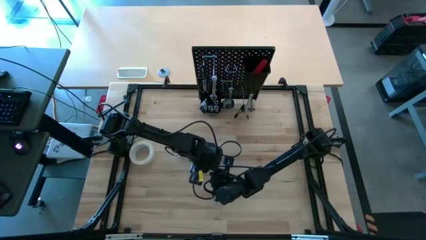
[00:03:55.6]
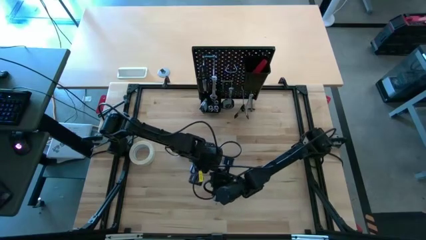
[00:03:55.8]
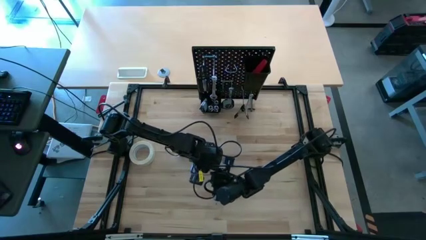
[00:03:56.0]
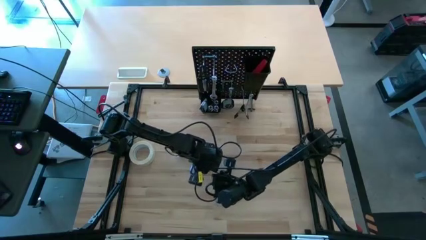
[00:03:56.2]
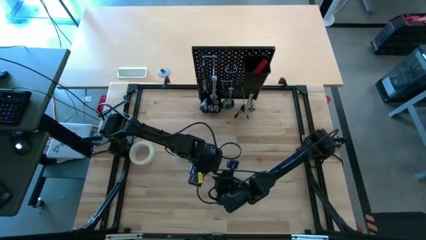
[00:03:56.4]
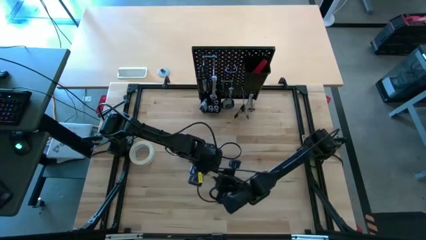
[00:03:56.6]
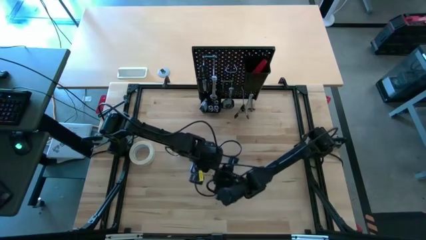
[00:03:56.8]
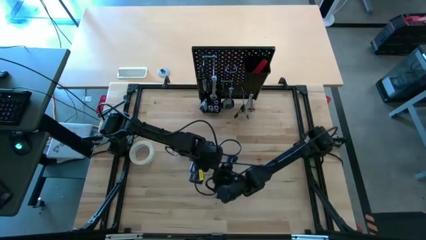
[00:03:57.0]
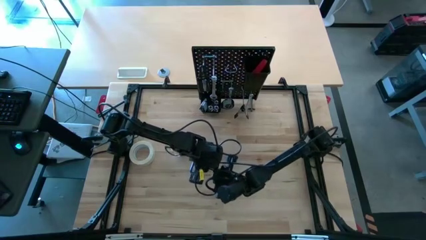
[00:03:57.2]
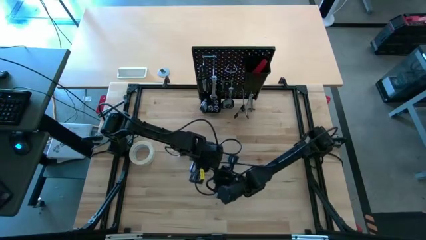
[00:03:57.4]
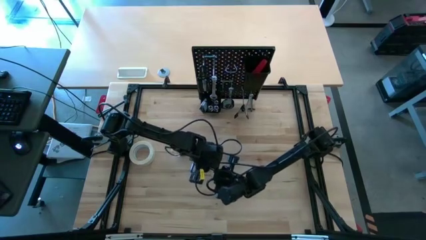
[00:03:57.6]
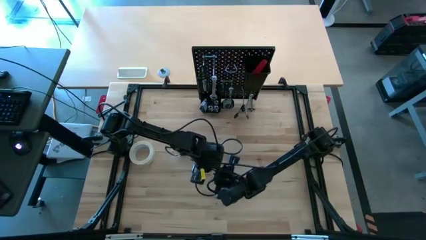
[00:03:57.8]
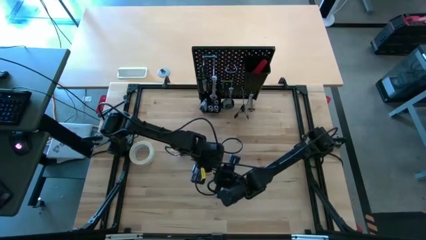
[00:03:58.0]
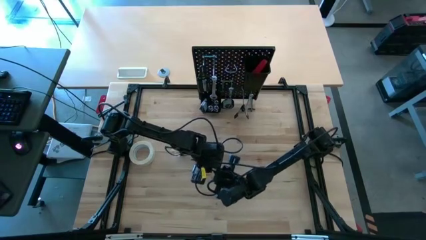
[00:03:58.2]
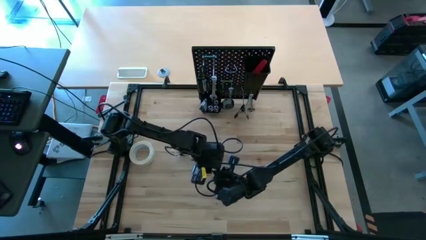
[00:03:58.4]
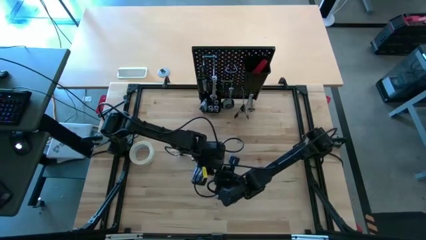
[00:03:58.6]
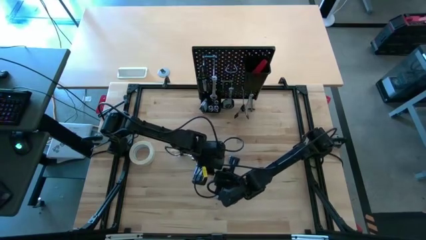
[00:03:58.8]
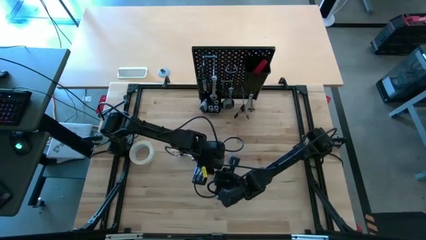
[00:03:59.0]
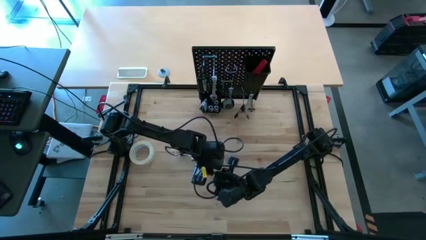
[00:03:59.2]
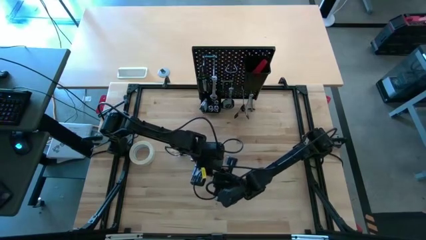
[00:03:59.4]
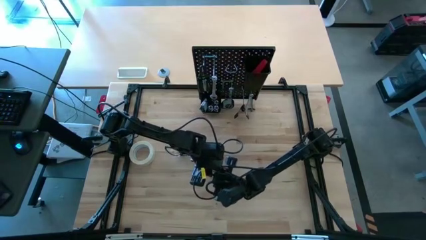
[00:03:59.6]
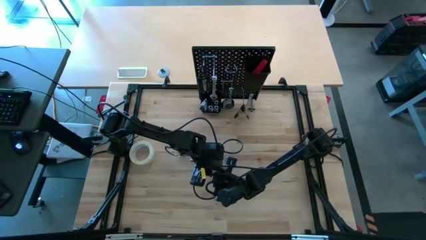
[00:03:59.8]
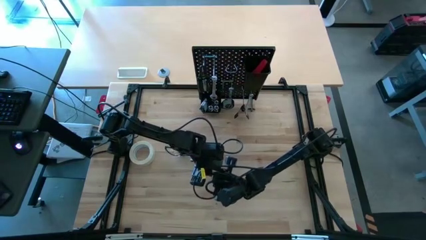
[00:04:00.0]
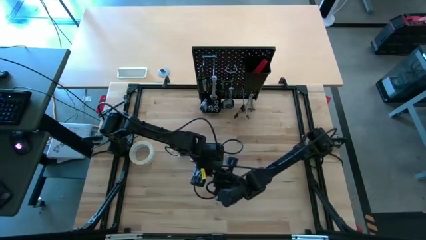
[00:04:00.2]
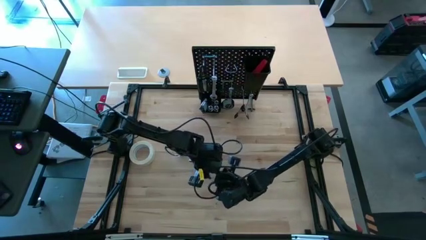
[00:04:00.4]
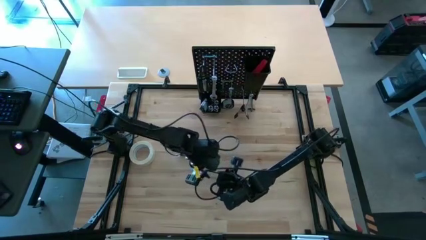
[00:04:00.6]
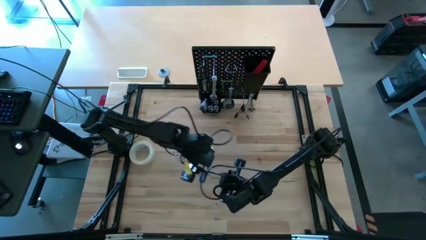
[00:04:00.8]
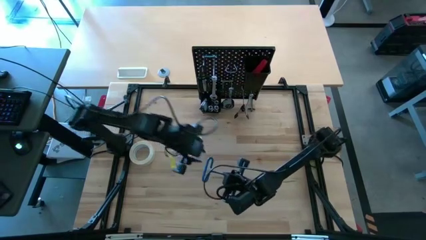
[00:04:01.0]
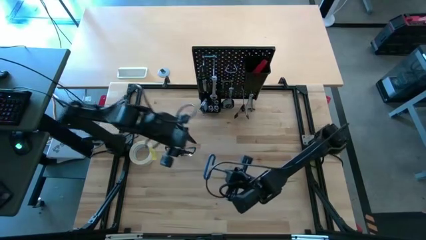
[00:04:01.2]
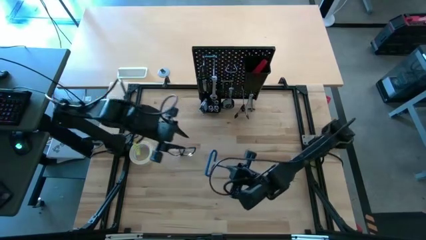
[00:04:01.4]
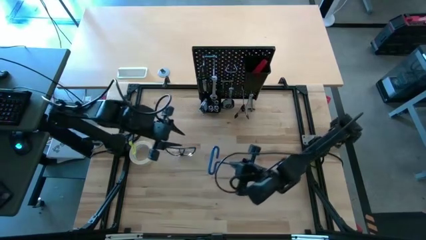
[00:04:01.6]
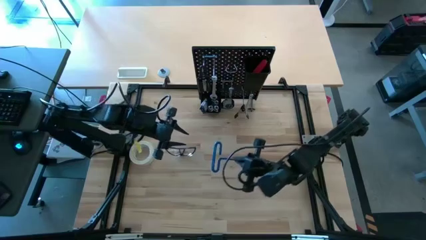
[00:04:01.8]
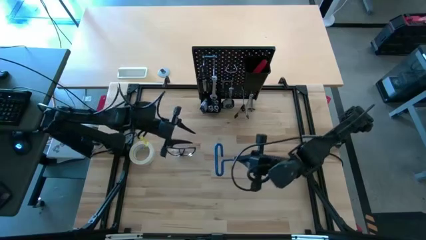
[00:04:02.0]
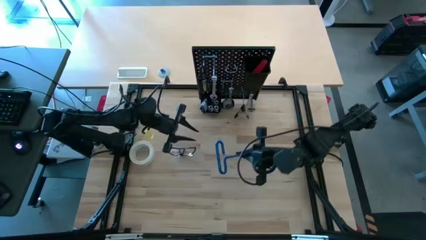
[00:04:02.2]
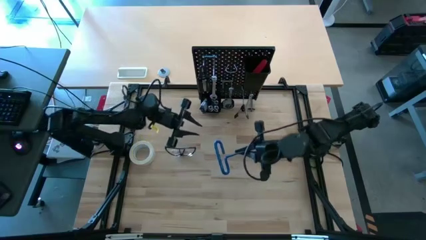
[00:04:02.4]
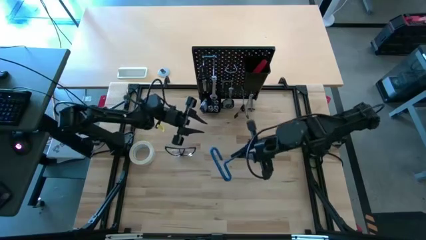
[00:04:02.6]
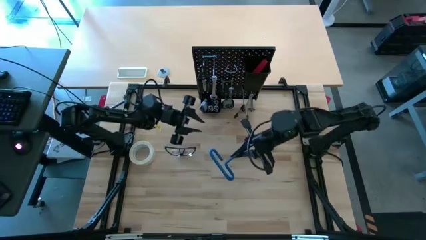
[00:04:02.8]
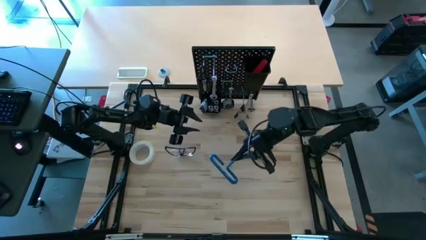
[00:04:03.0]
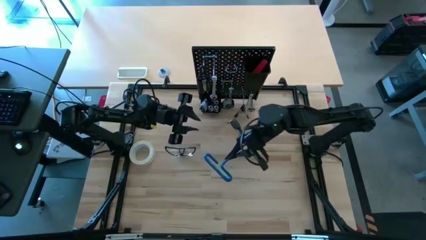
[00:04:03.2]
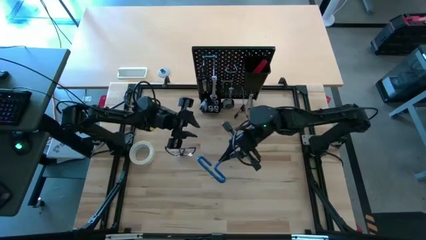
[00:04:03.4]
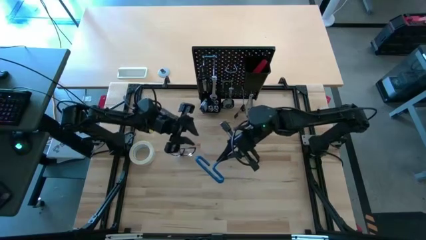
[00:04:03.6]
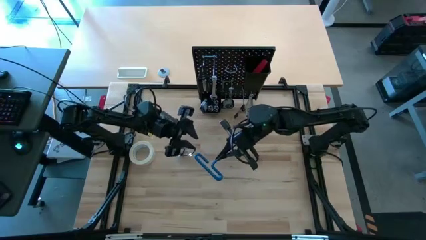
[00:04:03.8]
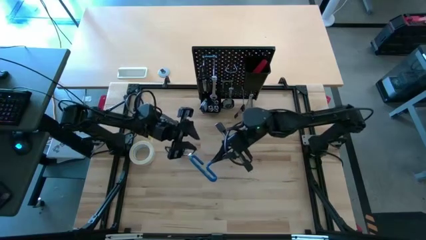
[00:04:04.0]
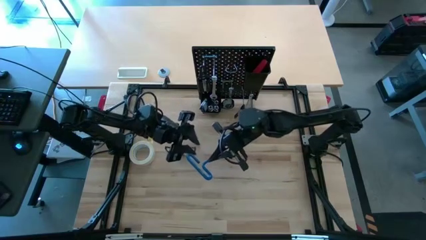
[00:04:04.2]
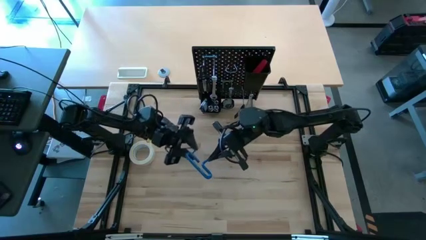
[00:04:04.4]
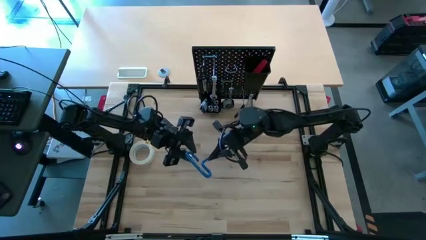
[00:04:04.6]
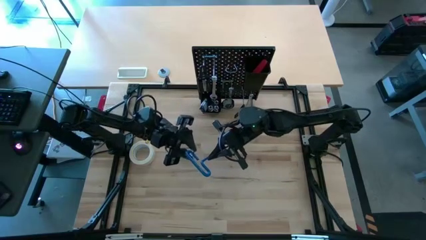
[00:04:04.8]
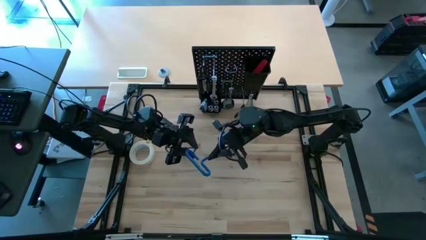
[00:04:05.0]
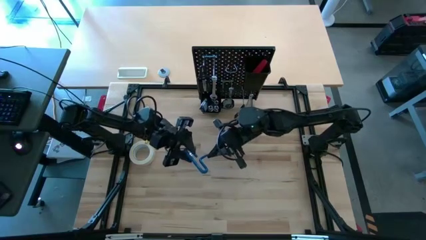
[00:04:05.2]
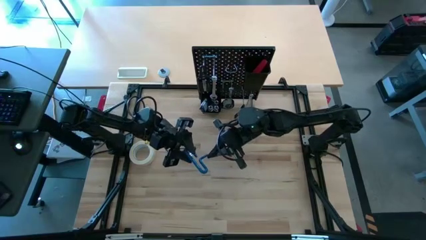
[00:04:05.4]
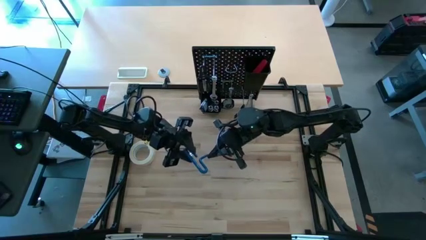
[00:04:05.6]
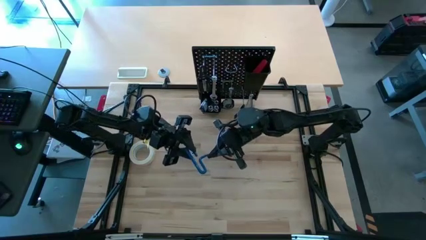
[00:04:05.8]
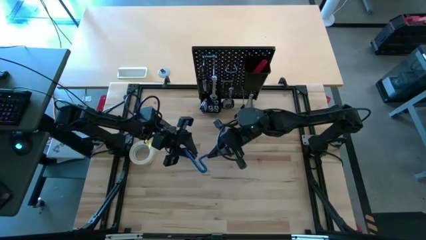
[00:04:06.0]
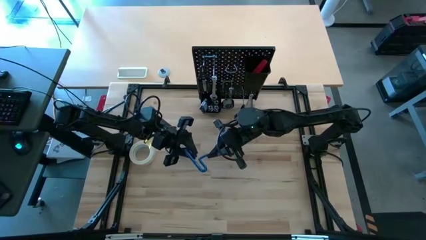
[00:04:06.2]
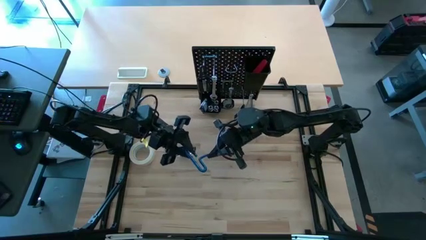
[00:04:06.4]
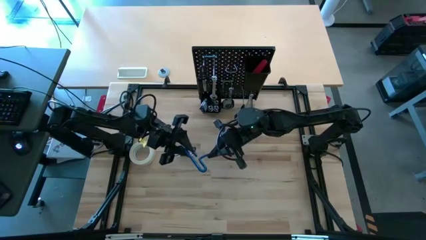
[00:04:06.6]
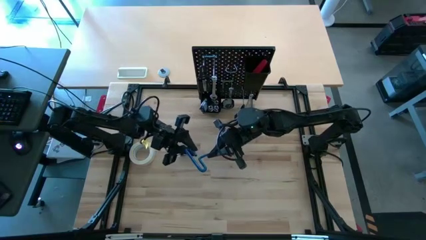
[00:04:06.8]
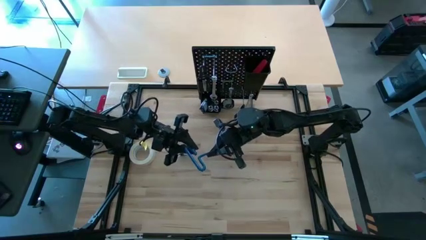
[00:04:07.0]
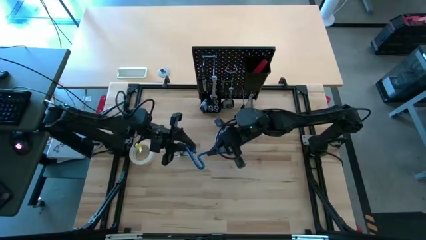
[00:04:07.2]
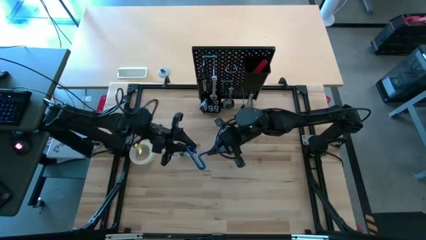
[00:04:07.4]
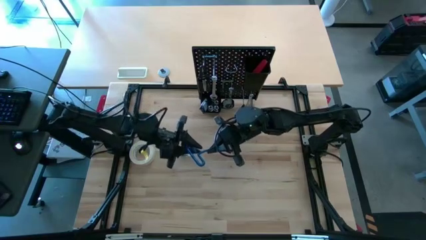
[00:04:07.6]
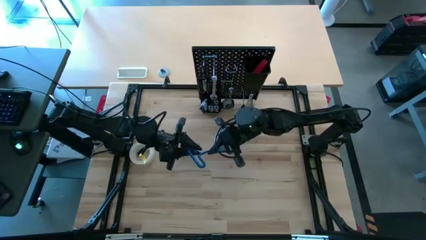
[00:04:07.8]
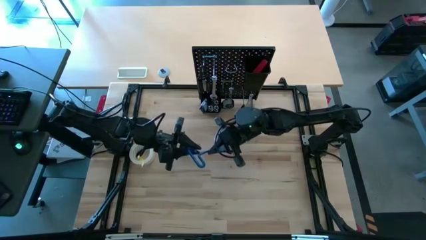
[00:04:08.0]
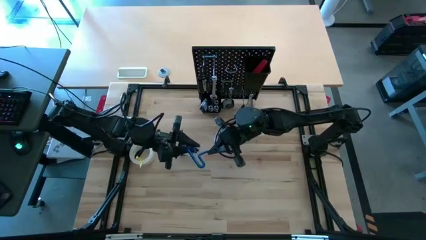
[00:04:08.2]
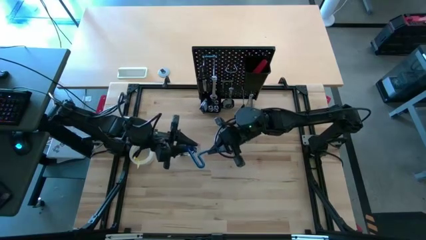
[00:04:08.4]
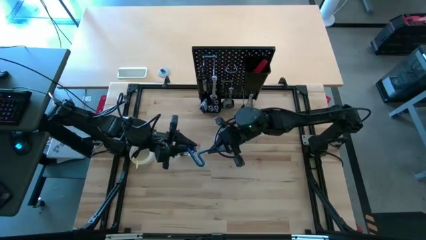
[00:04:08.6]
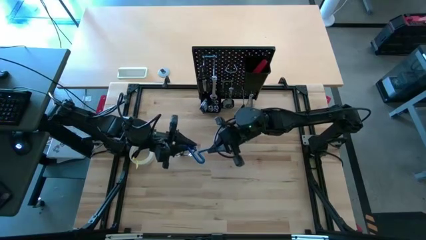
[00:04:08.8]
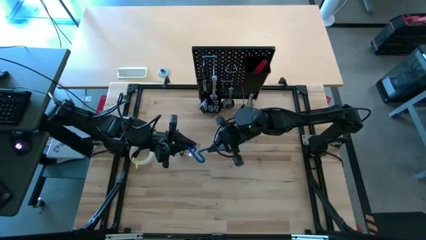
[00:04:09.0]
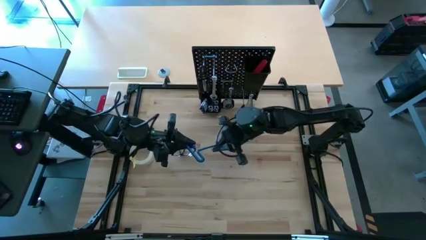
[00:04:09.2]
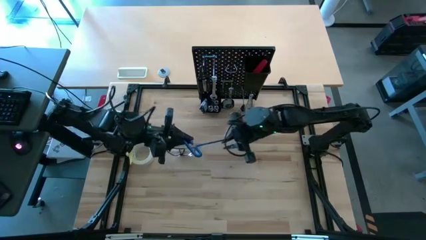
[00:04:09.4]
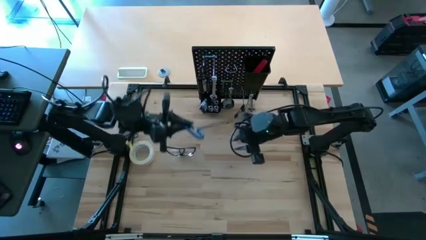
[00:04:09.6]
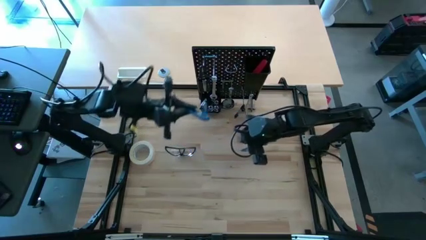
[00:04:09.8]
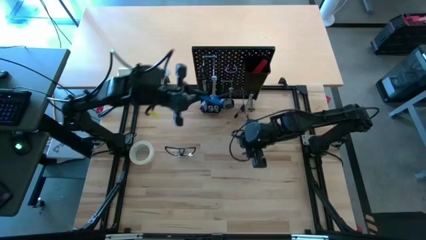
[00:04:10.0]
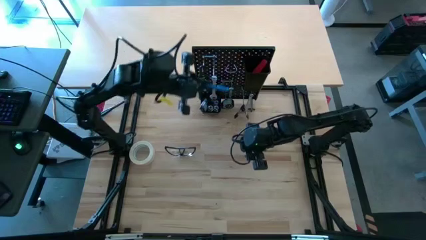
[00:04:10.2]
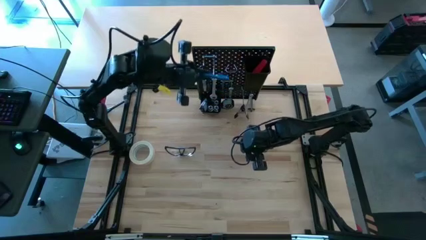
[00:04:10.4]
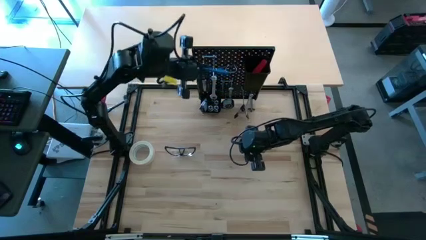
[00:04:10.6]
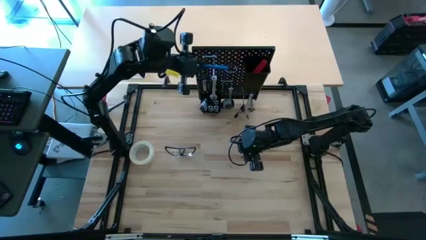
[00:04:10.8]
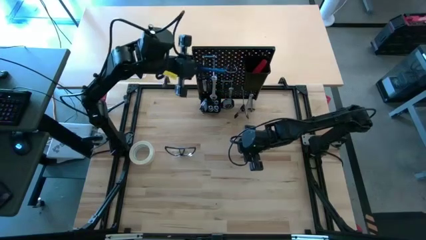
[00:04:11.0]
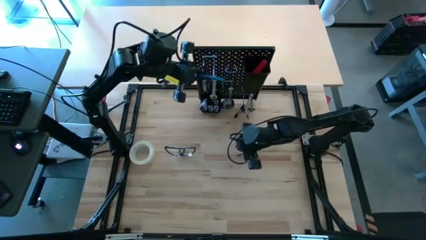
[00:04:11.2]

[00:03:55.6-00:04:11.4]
Task: Hang tools onto peg board
Put the pick tool into the black bin on the peg board

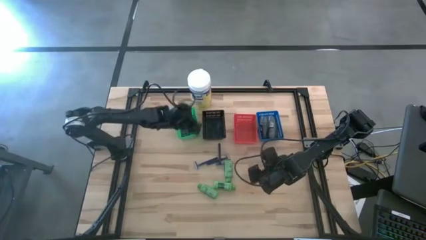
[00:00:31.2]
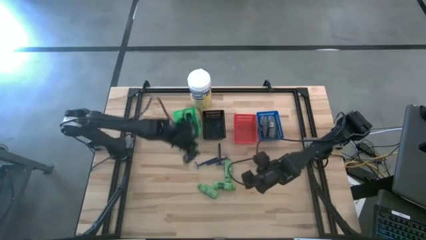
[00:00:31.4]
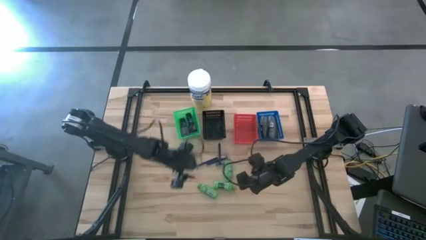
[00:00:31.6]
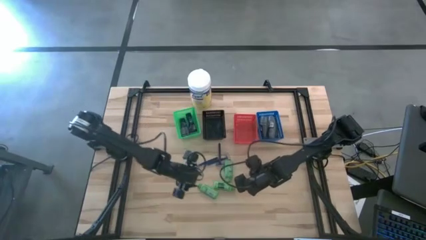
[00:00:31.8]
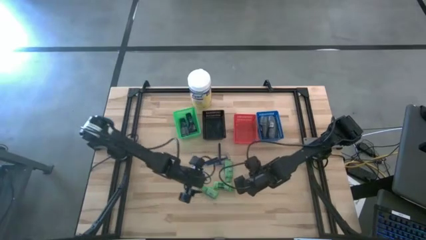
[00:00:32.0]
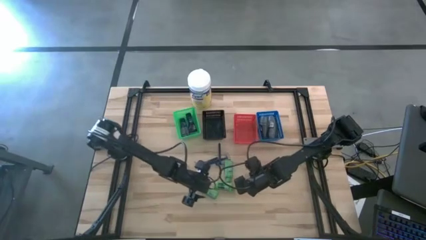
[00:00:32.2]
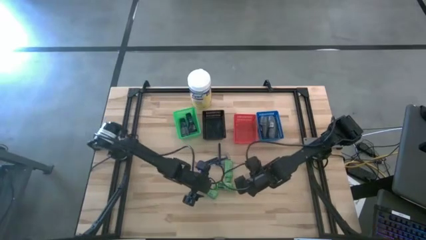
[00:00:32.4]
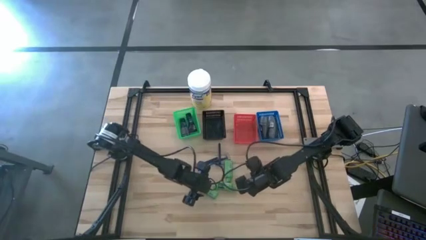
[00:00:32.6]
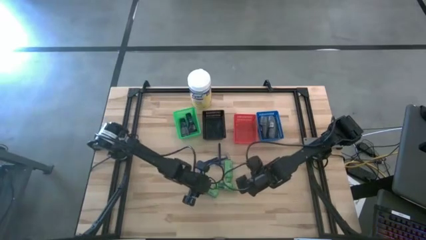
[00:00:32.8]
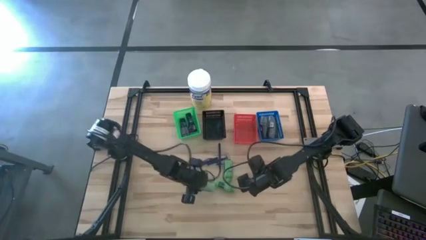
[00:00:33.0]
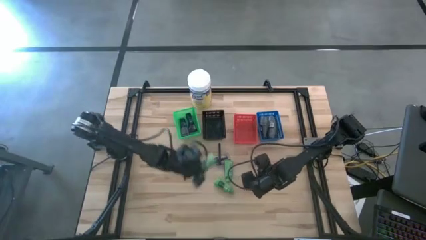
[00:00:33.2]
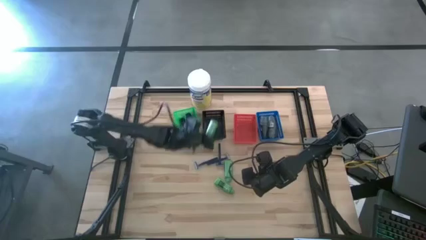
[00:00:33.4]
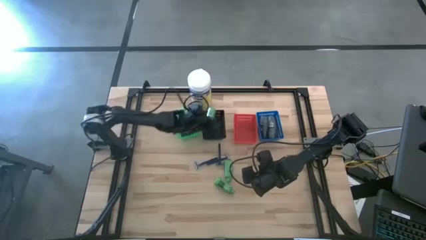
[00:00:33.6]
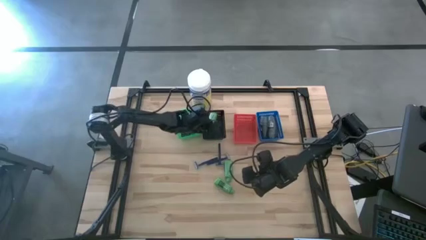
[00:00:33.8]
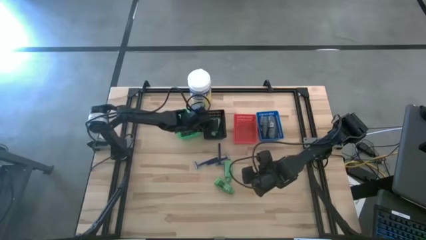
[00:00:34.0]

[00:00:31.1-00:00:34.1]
Task: Pick & Place Travel size toiletries
Put the green shampoo into the black bin
